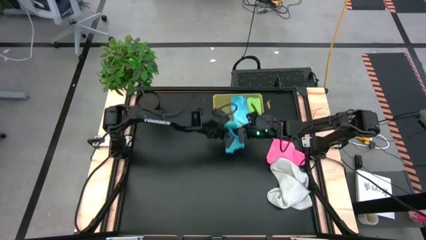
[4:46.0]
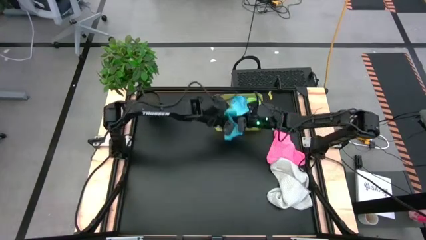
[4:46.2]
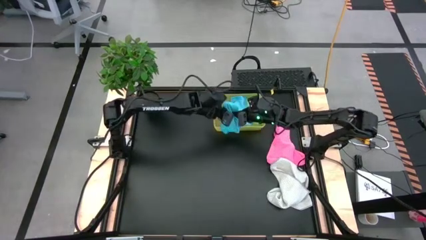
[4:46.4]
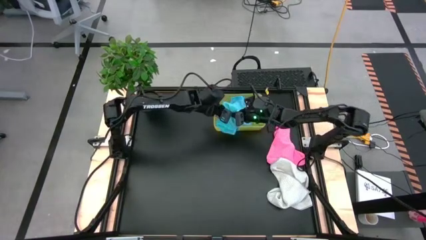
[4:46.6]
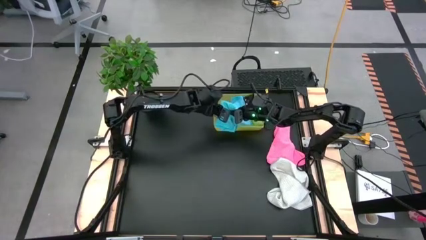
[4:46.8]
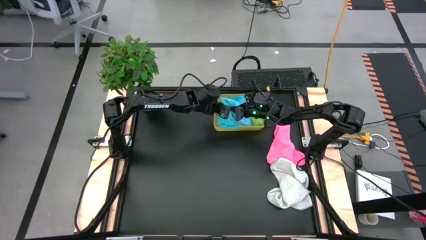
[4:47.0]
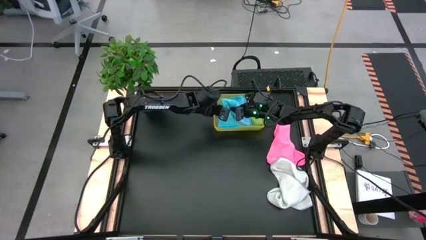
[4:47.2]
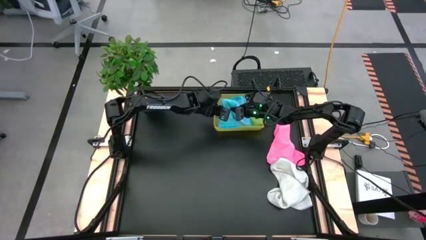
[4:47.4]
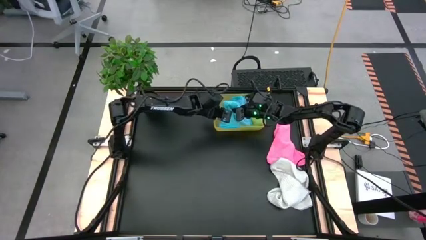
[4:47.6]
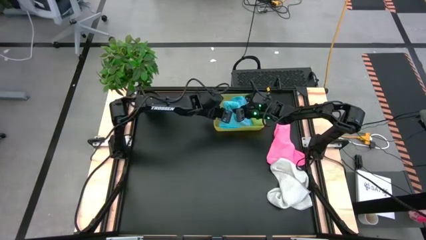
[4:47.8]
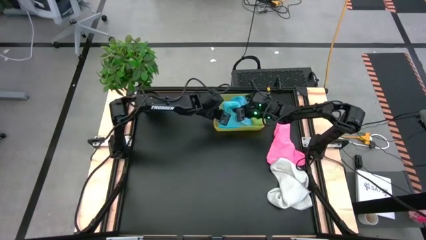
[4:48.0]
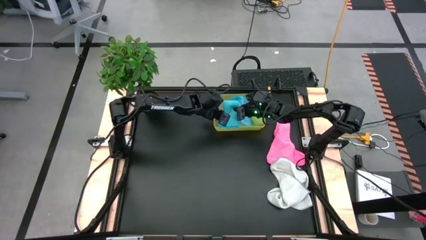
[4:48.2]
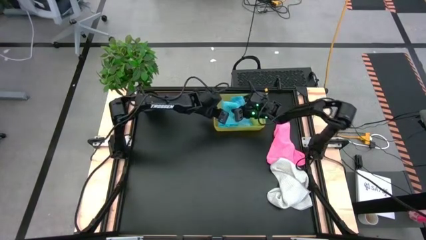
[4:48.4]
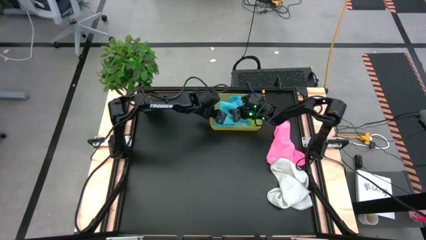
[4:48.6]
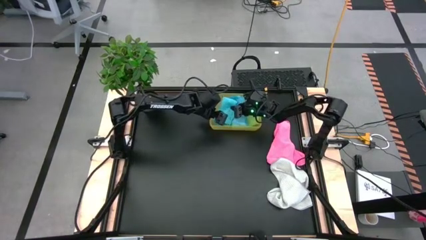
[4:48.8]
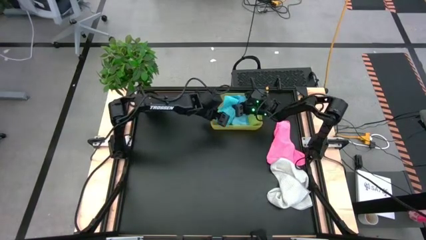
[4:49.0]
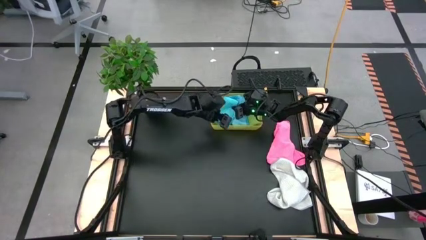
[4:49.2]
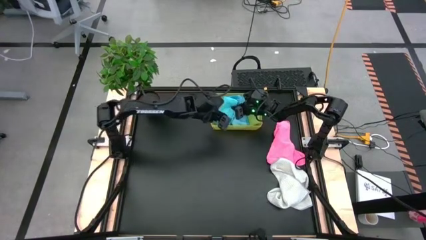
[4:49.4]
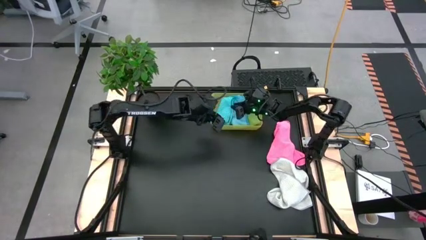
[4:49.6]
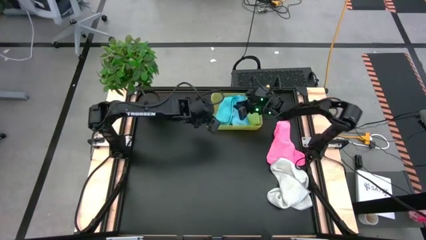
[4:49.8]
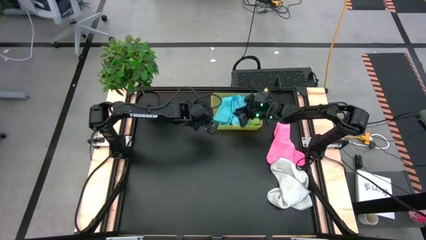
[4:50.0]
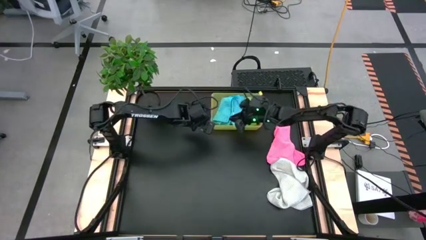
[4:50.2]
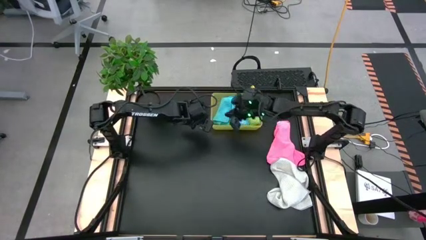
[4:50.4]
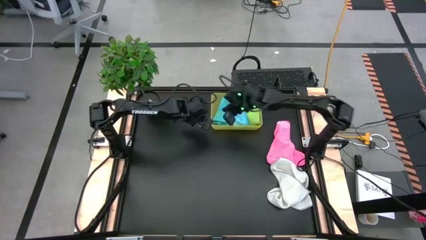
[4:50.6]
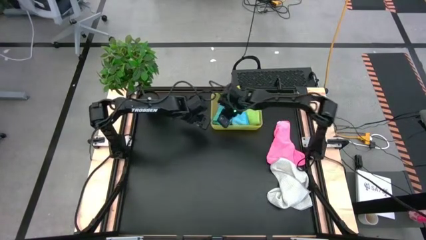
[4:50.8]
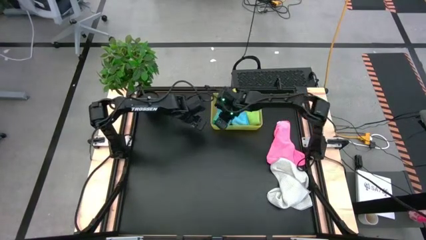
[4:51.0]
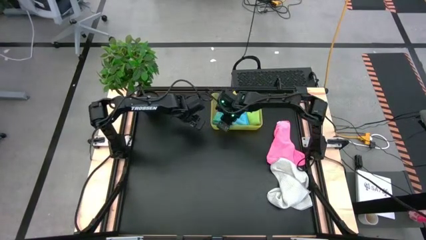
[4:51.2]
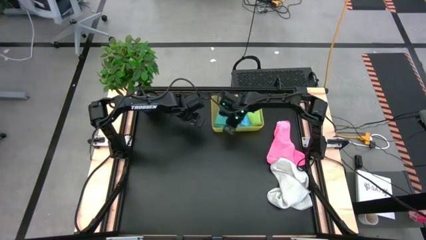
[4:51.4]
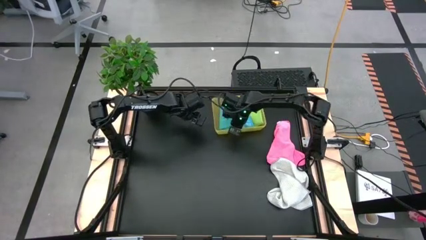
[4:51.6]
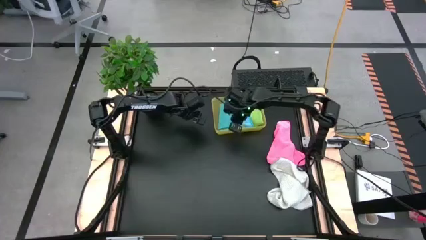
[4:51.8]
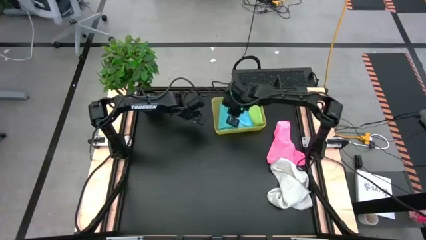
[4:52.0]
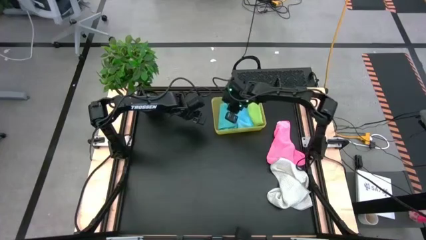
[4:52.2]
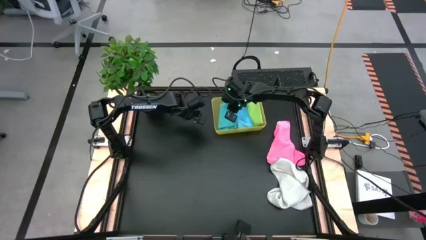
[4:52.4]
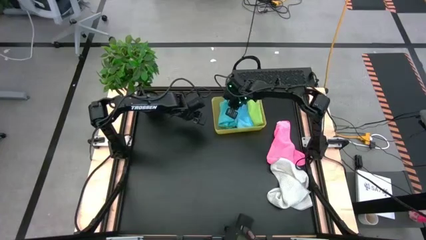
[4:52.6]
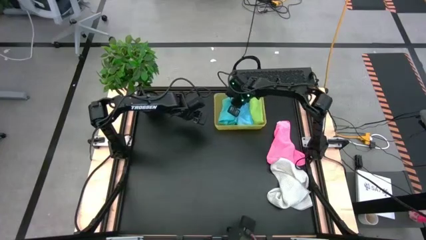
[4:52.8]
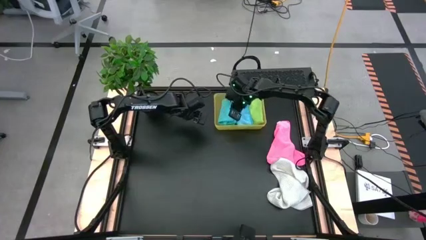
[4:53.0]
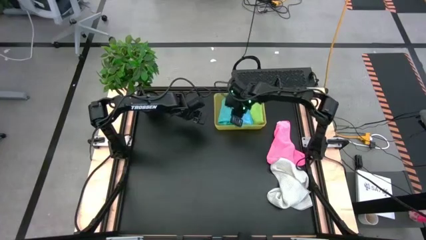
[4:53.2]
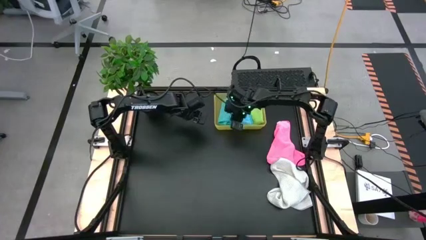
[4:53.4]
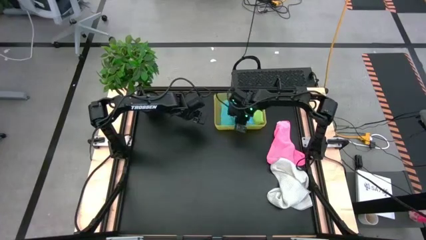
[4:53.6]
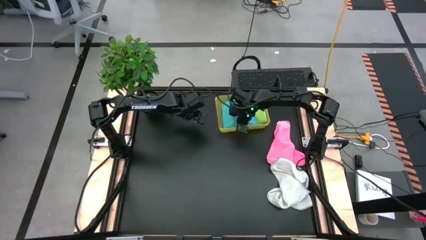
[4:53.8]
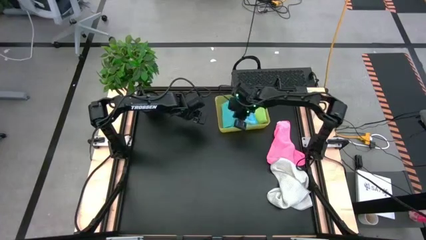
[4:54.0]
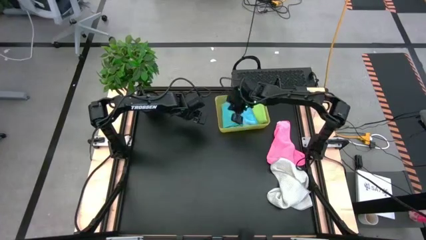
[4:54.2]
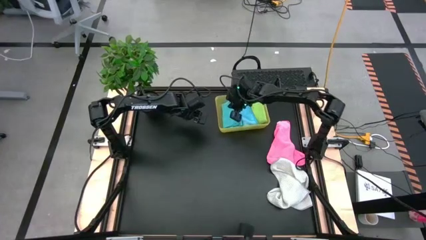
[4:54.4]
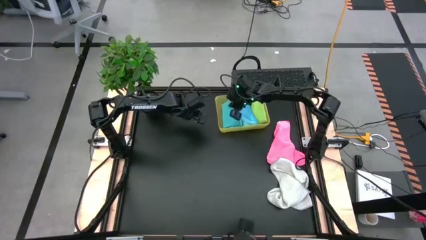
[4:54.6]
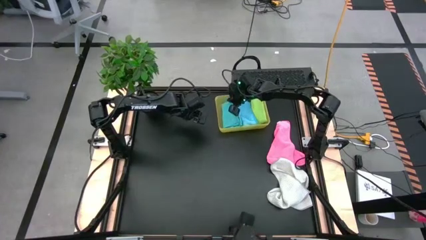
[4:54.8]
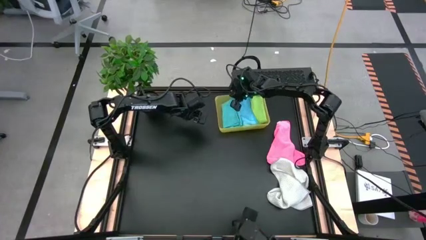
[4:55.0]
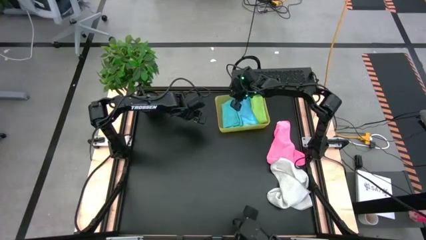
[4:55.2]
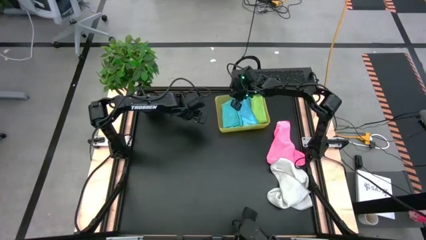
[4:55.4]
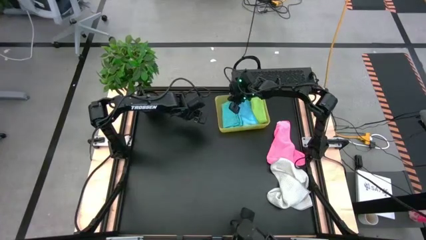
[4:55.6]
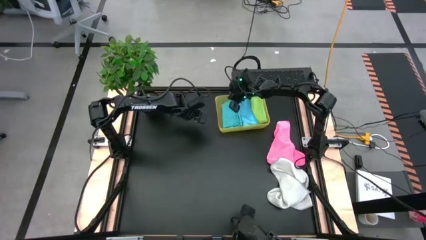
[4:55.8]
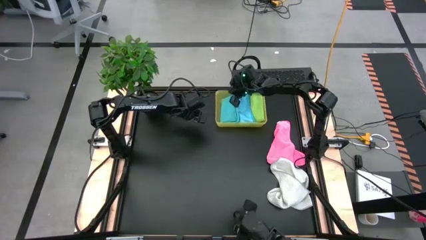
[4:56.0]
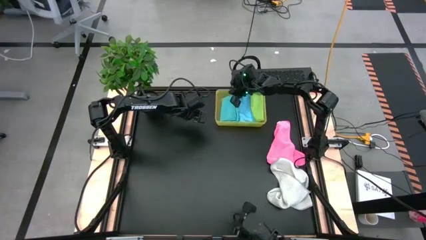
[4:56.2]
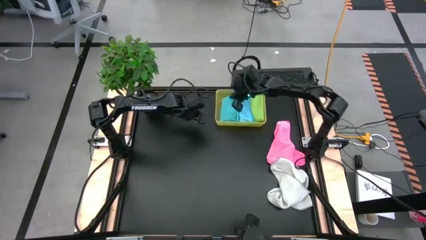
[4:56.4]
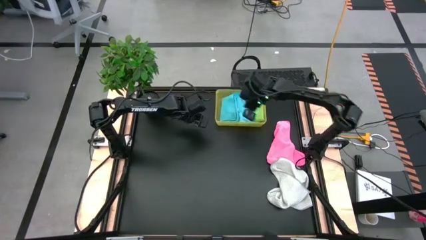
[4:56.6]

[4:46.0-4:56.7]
Task: Fold microfiber towels
Put the blue microfiber cloth into the bin

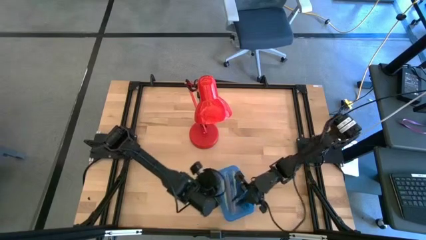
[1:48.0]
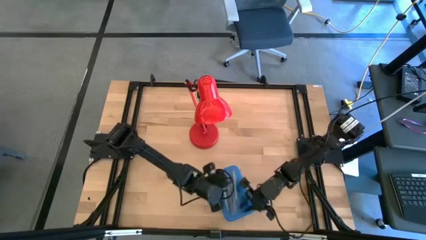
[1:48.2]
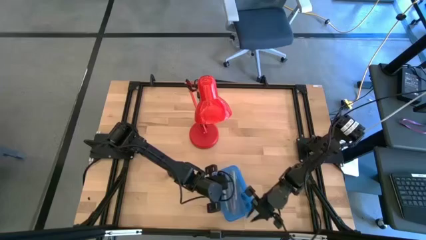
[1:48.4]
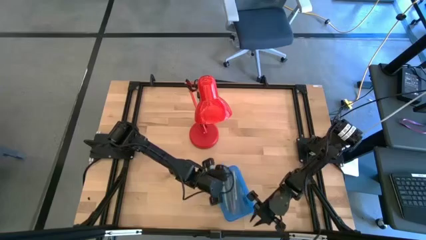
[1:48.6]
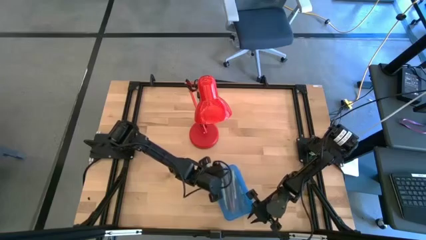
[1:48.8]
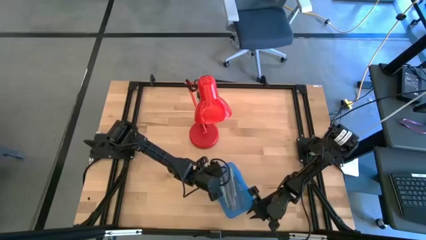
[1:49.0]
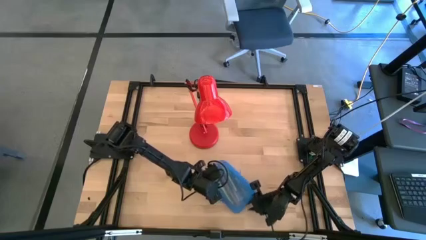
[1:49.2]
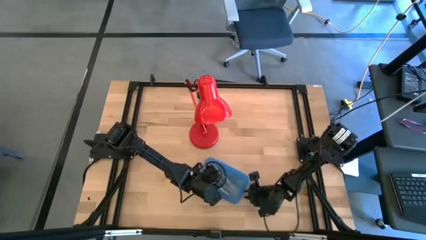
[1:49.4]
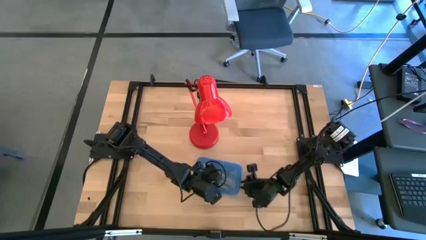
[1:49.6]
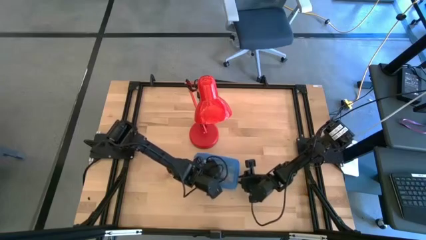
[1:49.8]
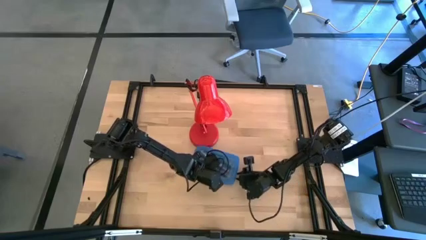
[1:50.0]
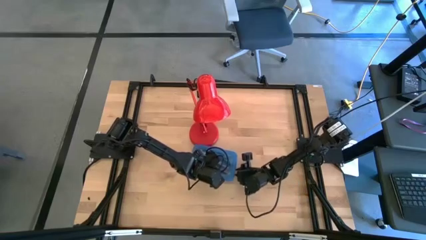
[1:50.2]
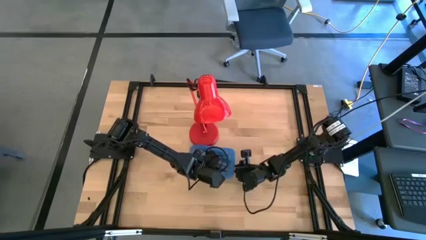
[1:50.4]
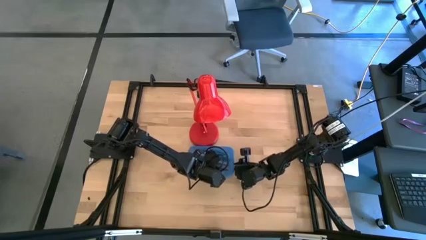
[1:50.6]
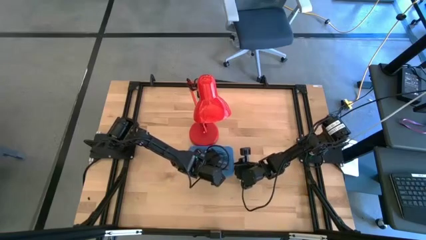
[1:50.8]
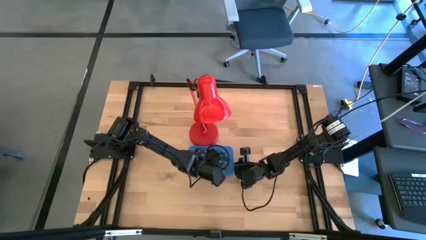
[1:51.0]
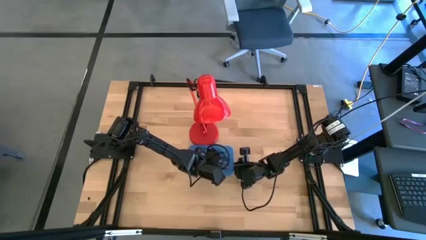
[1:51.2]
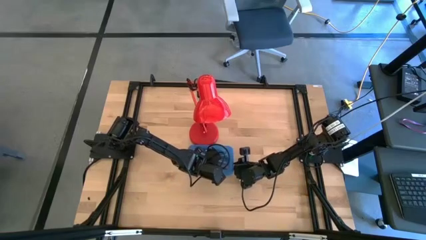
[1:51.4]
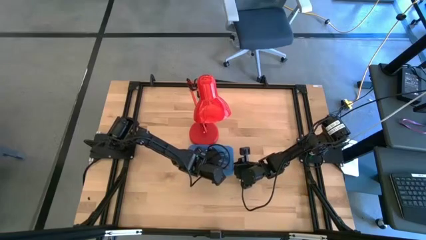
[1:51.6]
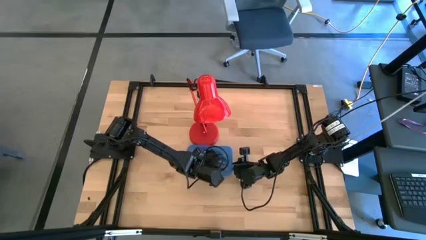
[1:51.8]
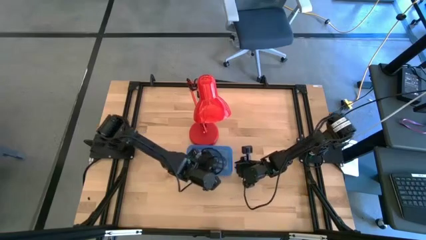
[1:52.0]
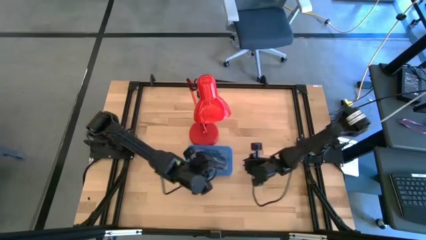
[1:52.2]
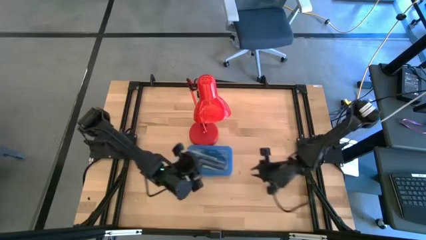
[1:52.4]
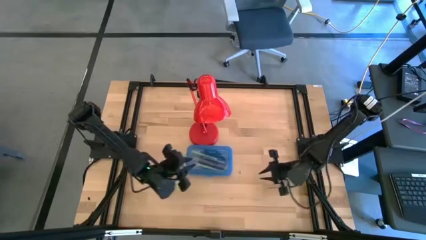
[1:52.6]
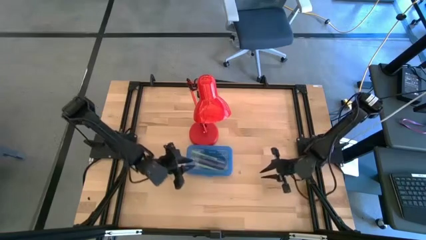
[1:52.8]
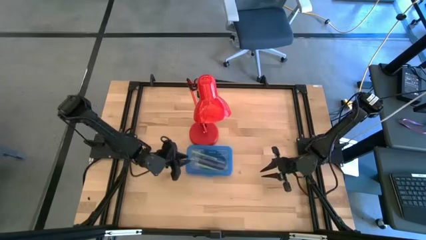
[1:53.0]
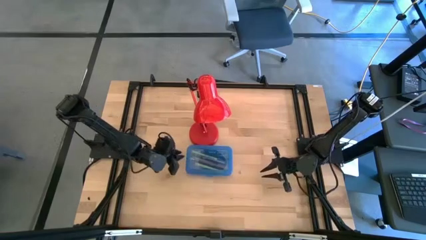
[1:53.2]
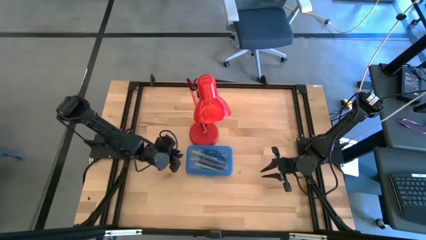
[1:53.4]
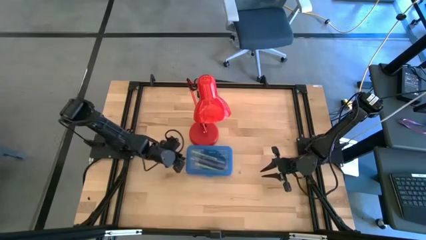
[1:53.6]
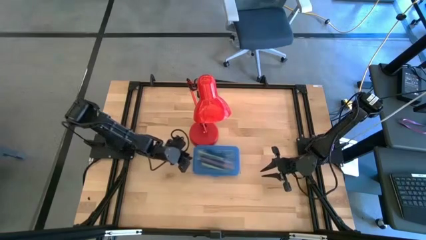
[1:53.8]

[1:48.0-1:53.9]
Task: Pick & place school supplies into a supply box
Move the blue supply box to the center of the table
